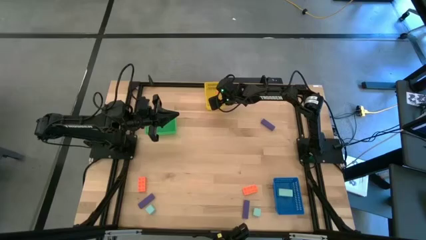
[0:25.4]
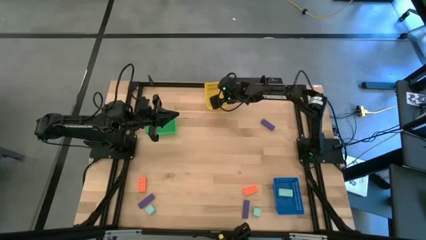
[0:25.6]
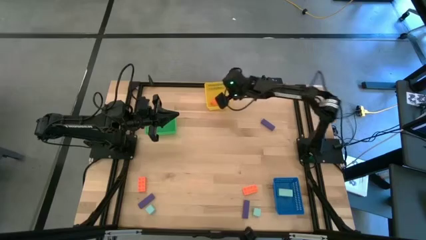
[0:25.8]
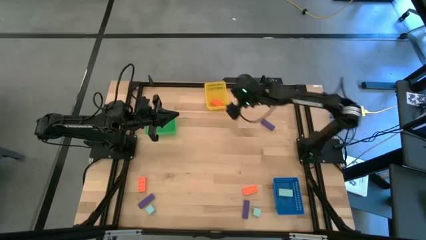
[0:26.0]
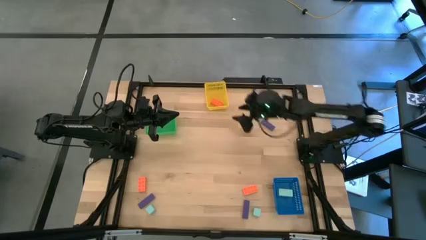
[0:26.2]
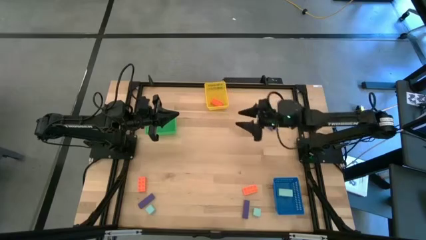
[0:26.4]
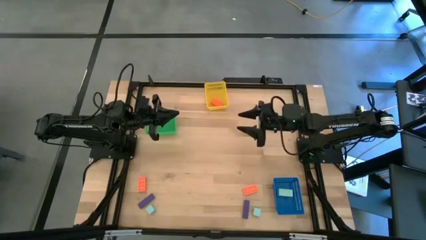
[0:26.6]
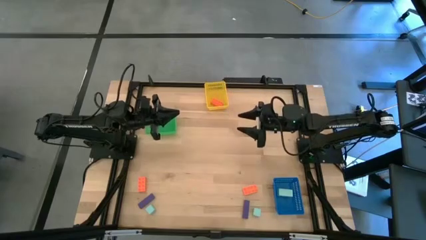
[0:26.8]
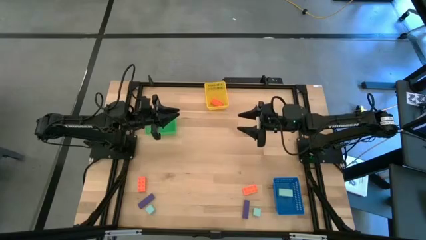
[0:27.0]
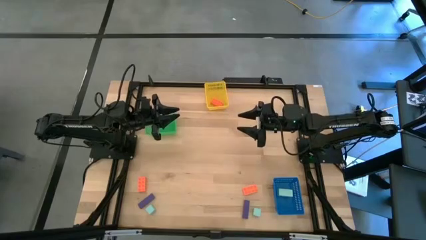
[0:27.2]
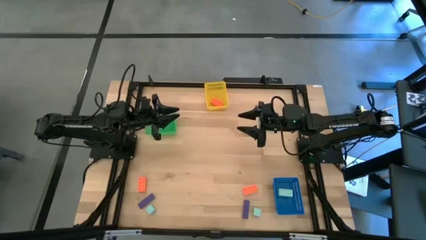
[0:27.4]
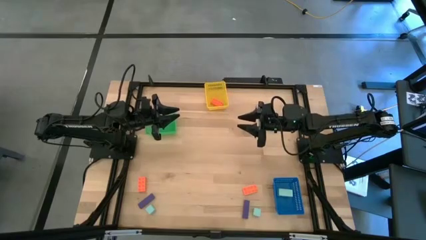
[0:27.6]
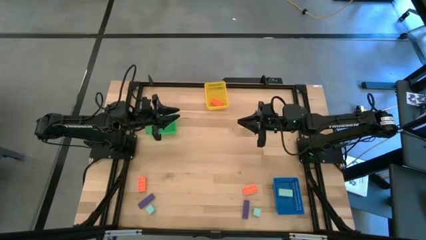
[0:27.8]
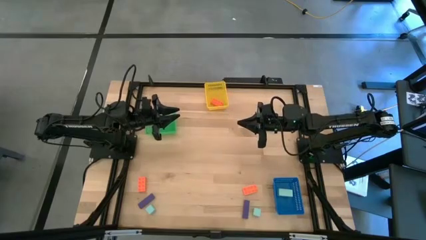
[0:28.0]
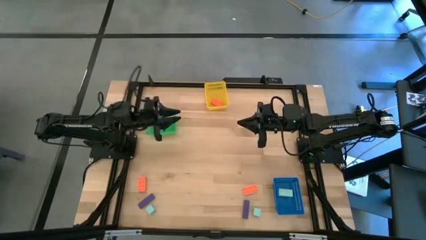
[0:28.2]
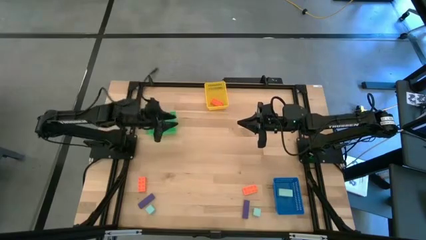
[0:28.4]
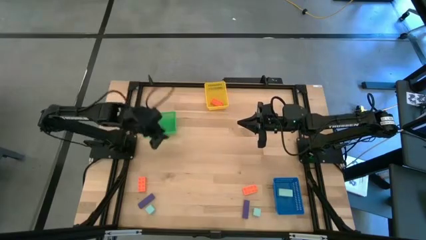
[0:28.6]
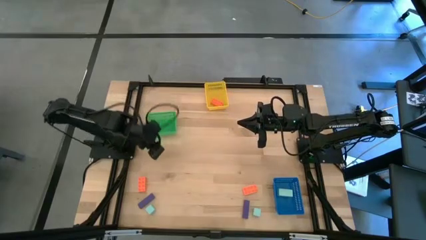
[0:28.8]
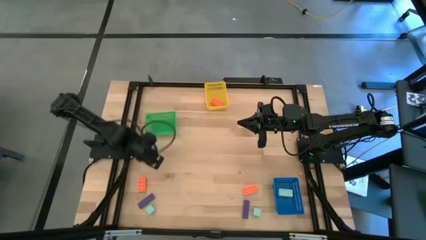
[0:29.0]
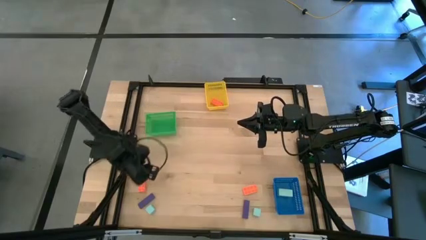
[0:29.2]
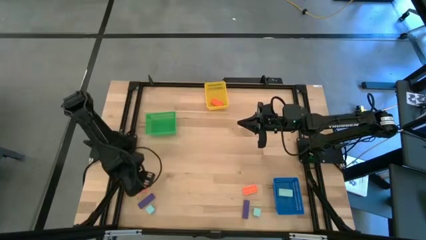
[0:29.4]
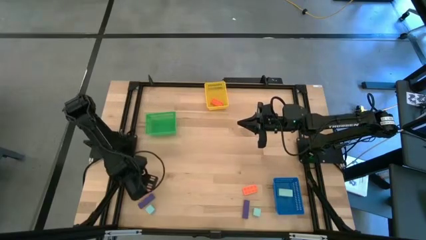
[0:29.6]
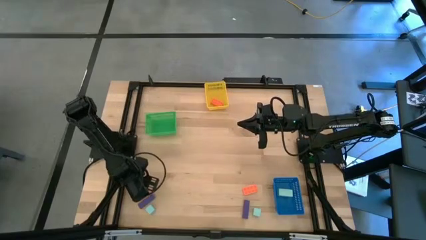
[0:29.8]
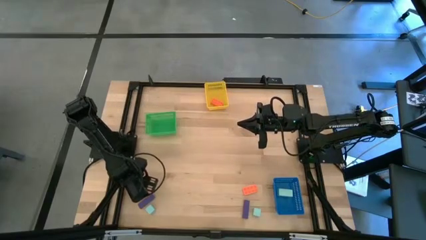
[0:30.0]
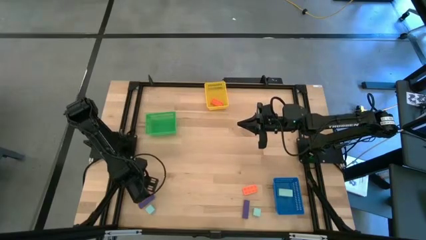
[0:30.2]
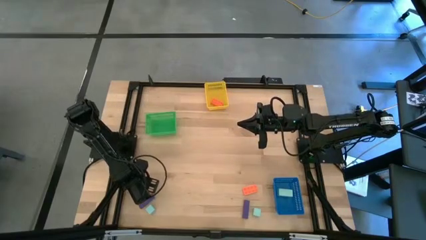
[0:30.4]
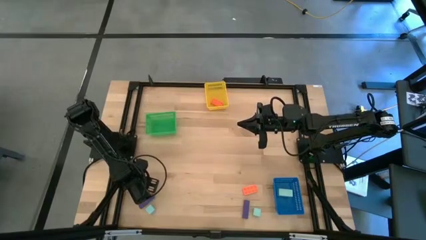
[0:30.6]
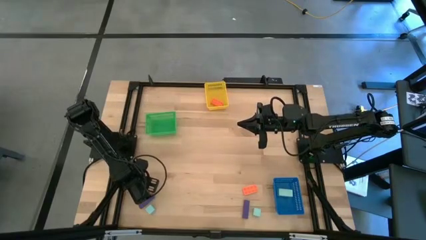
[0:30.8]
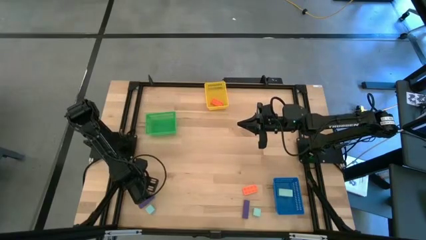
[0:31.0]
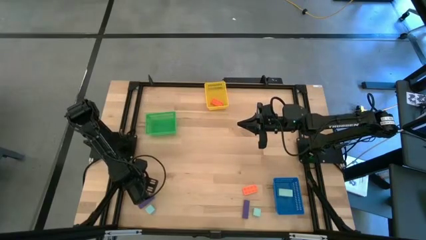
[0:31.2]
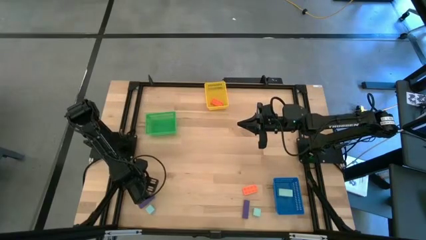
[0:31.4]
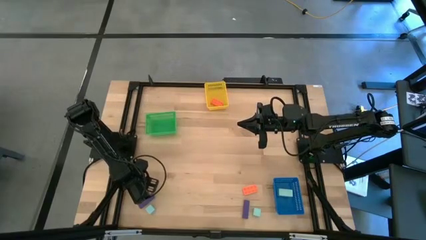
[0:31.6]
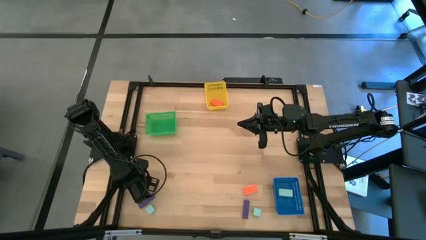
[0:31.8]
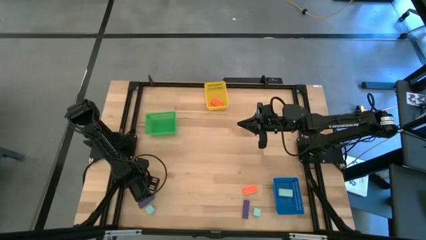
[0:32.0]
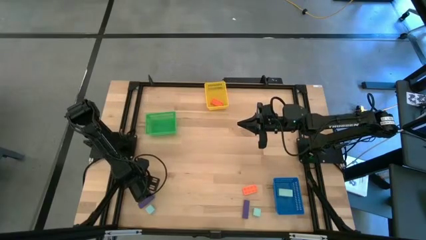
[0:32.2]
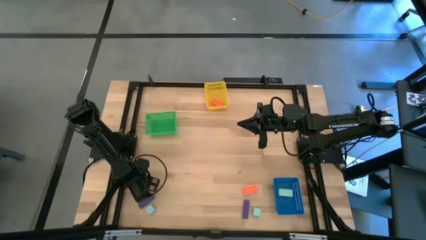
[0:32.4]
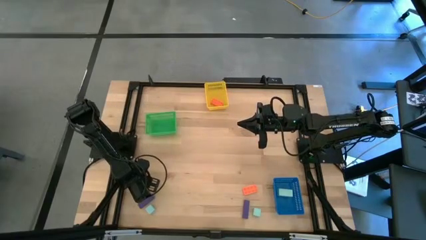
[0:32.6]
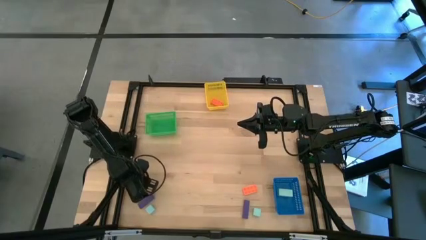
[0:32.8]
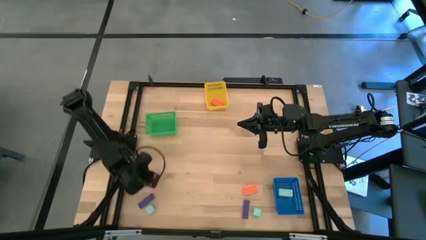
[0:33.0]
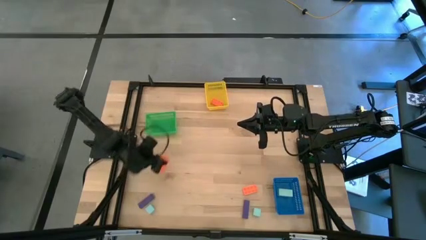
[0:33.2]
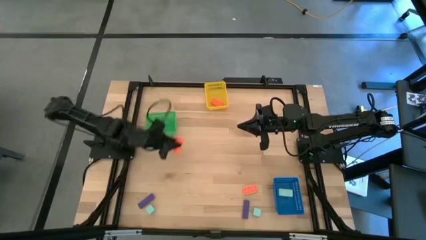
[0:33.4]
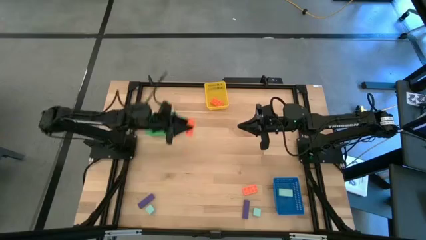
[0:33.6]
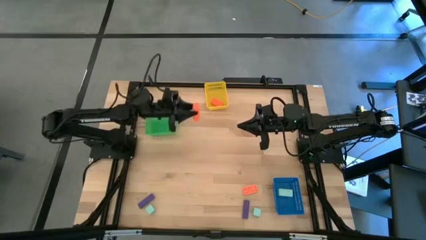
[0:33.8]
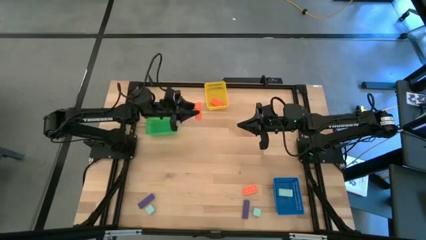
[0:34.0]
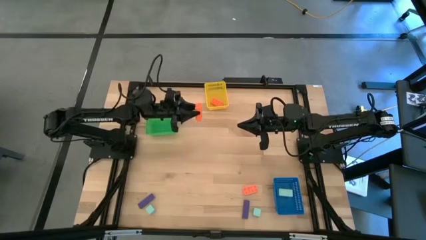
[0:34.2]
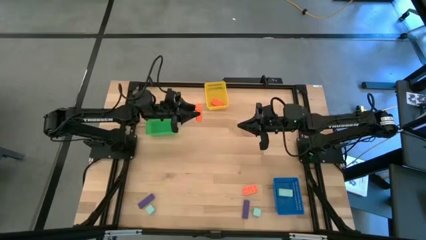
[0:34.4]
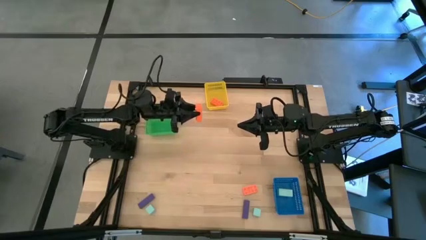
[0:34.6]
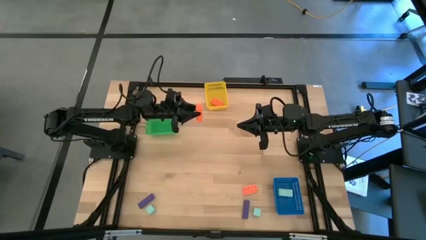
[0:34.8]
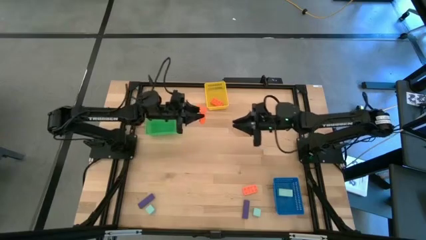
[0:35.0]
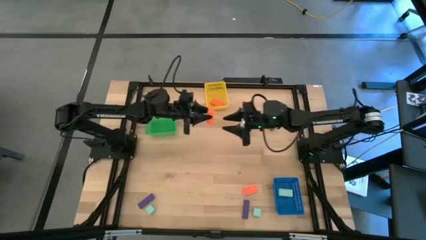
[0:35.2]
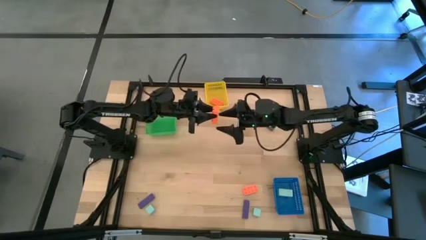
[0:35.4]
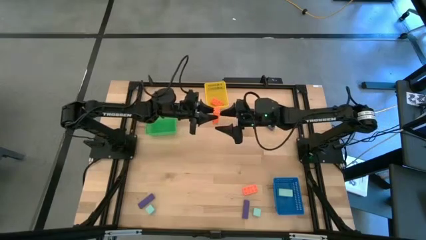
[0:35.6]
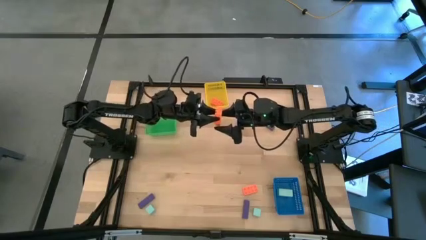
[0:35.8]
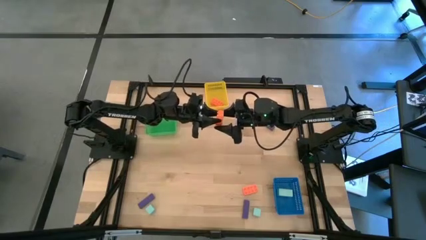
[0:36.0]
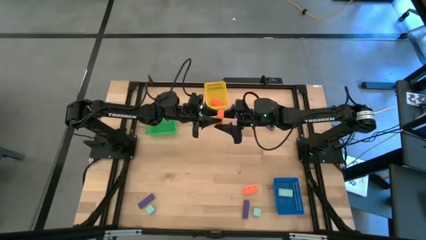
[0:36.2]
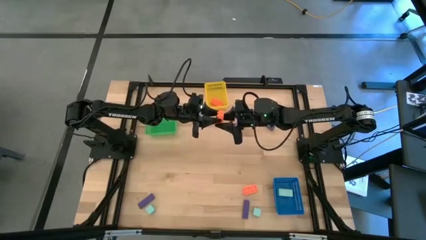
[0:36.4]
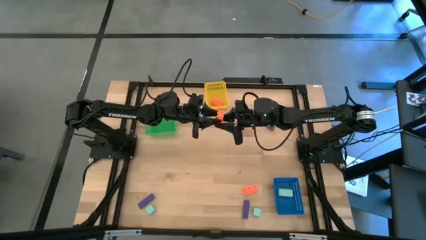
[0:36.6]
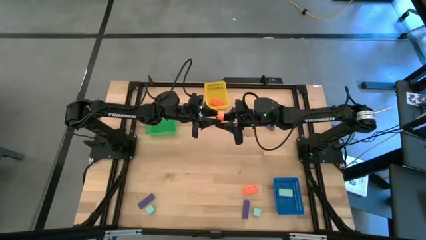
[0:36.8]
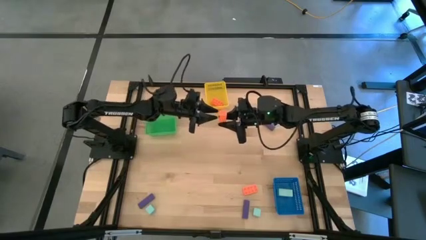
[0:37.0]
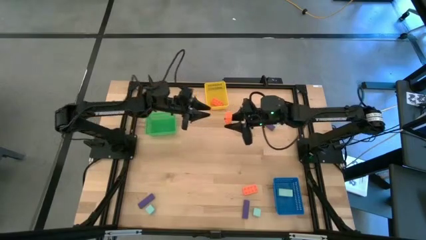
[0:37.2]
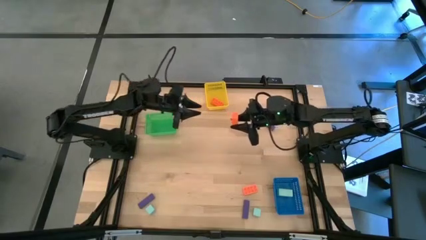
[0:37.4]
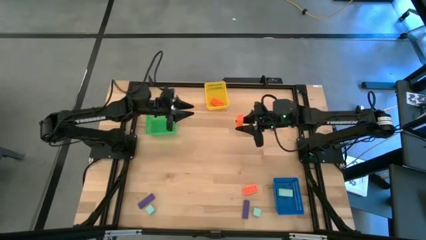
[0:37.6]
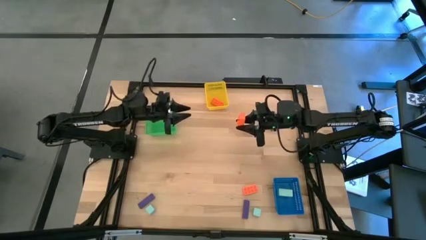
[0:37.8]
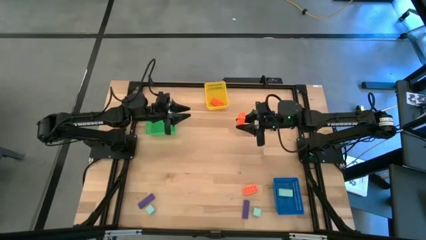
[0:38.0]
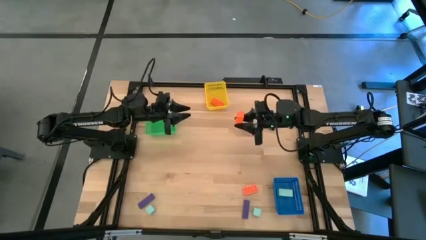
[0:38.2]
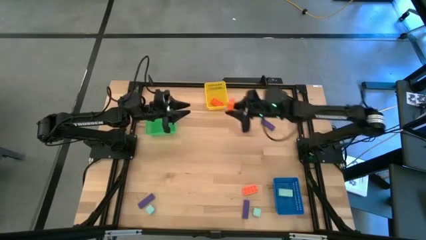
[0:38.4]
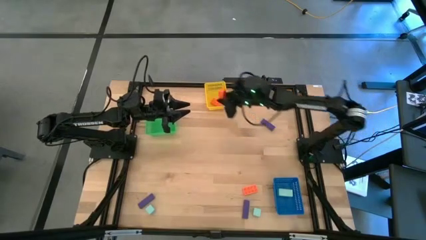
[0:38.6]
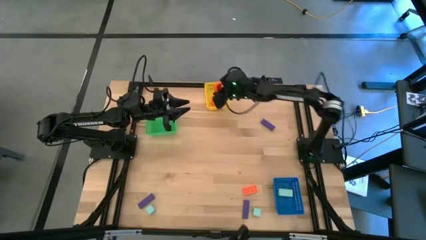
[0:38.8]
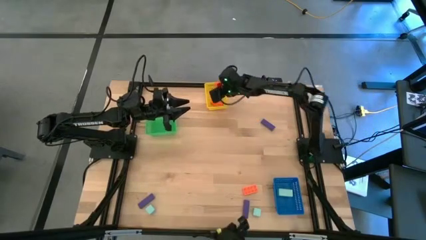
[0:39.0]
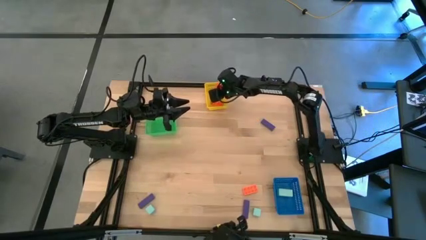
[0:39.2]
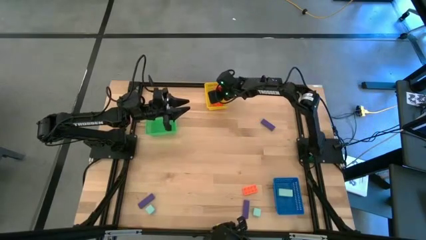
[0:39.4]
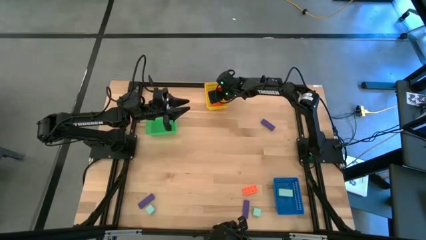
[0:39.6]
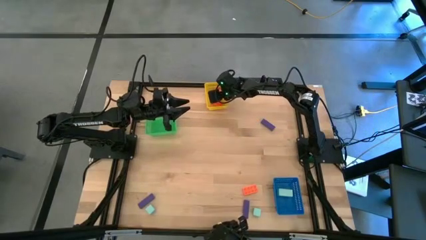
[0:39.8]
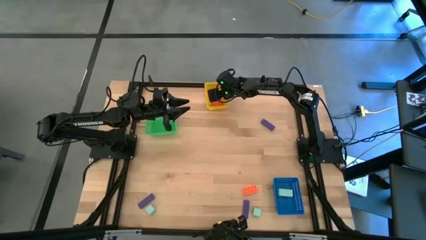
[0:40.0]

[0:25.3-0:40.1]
Task: Sort & place blocks by color
Put the left orange game piece into the yellow bin

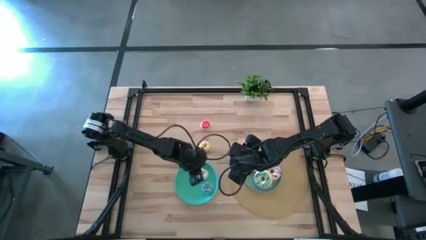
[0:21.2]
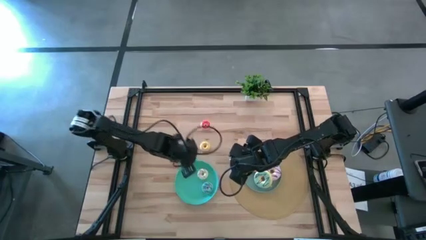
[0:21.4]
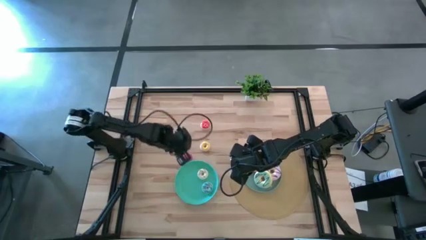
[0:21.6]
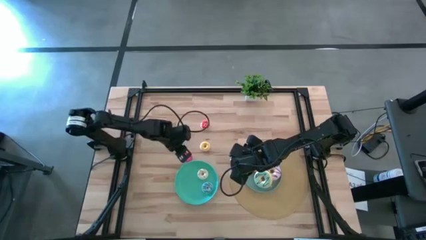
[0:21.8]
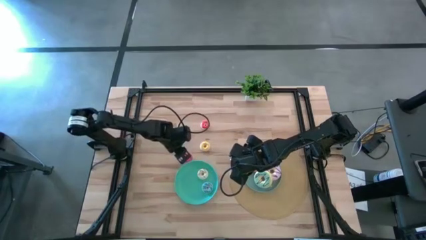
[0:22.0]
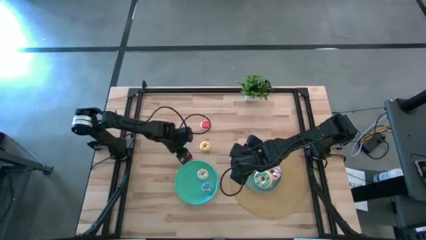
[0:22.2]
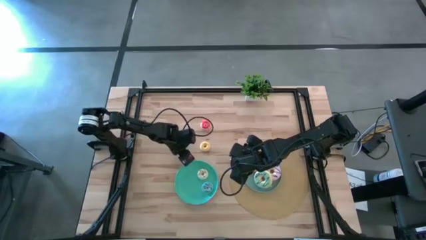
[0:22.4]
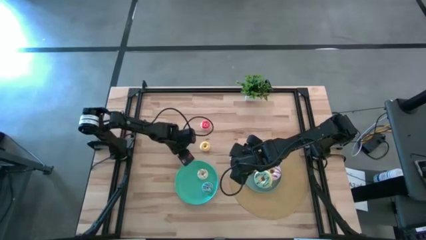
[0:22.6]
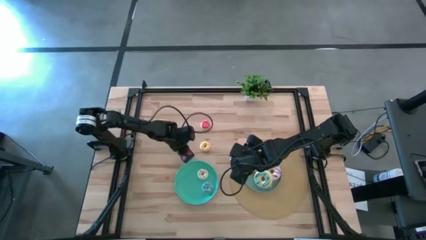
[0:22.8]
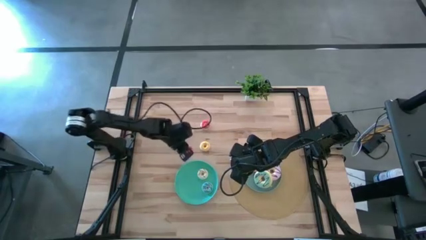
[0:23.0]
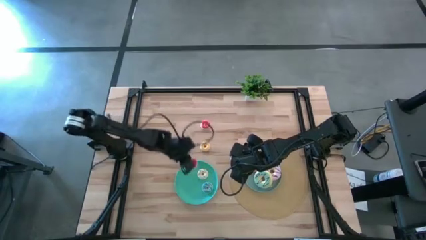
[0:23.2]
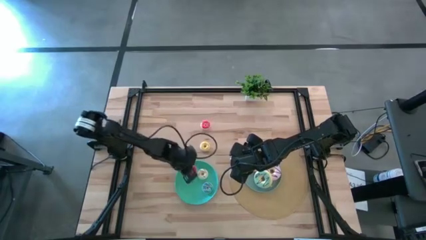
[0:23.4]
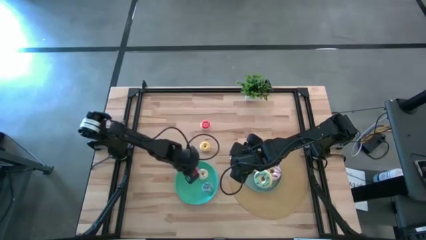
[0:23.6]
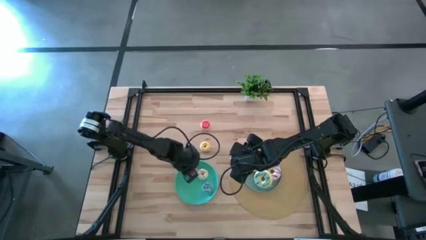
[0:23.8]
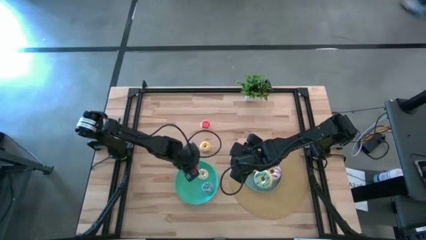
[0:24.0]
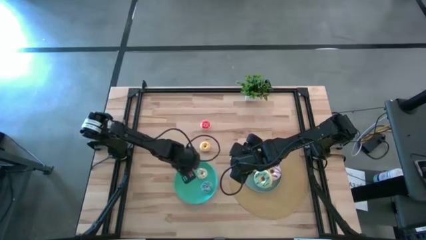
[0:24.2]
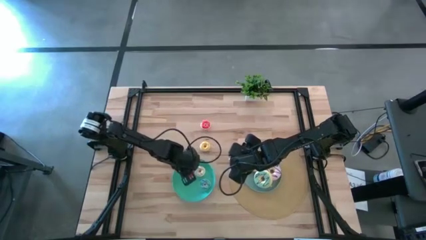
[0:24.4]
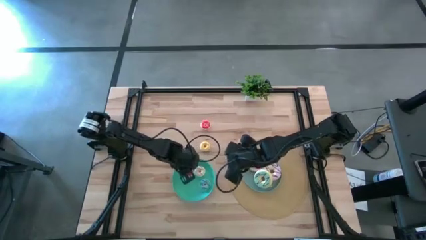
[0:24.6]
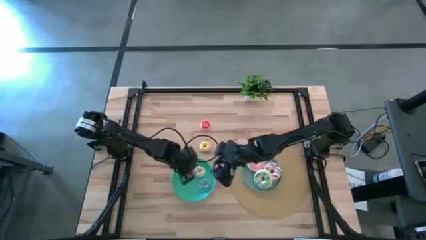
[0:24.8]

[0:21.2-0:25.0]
Task: Pick & Place donuts
Put the bottom small orange donut on the green plate
